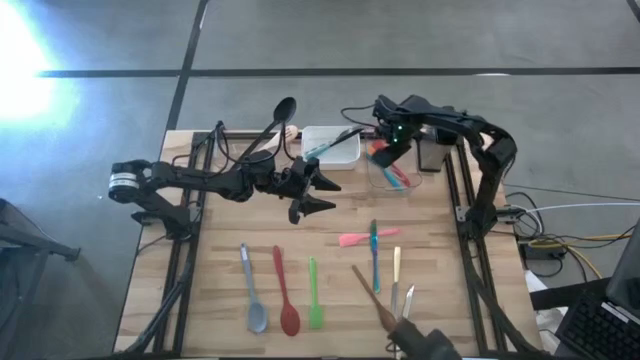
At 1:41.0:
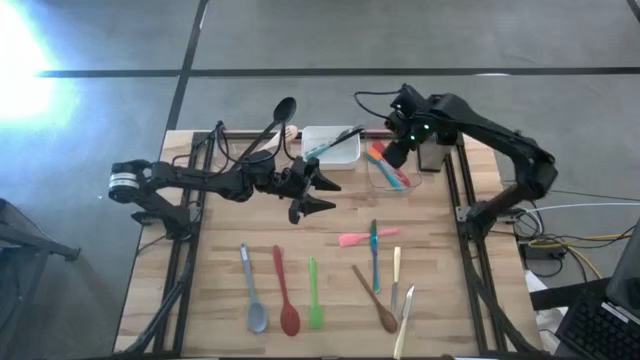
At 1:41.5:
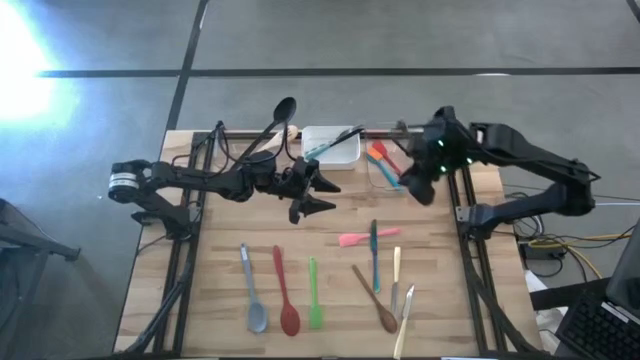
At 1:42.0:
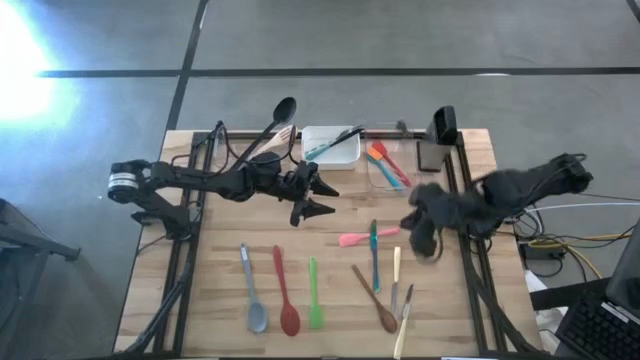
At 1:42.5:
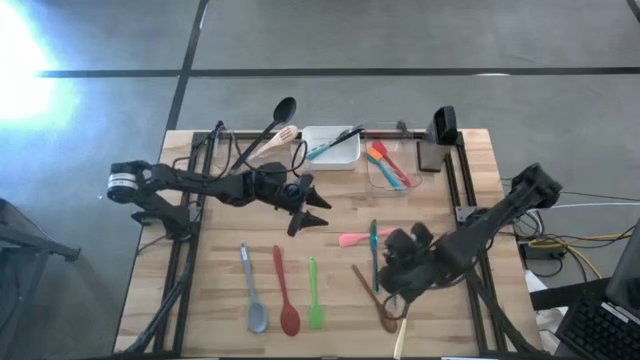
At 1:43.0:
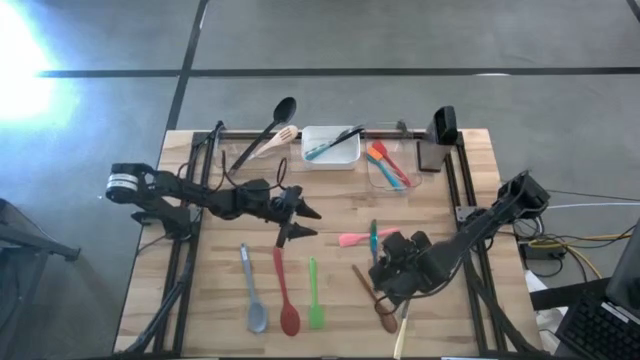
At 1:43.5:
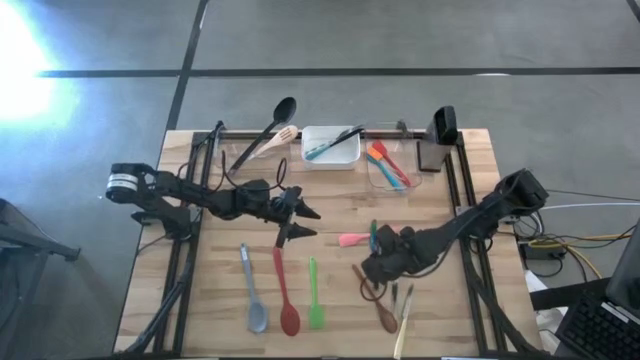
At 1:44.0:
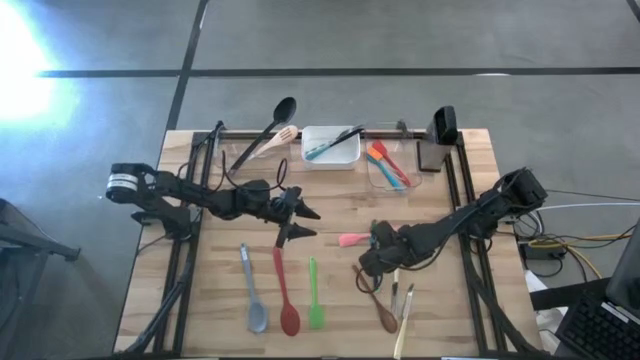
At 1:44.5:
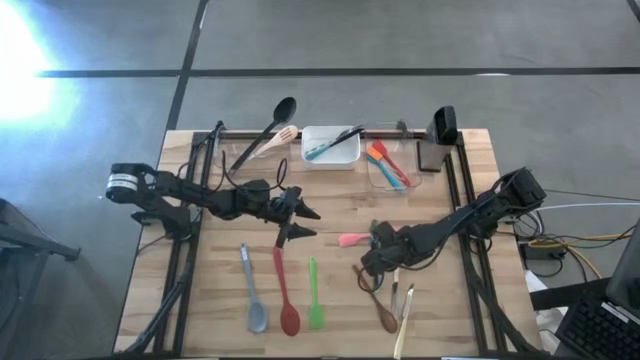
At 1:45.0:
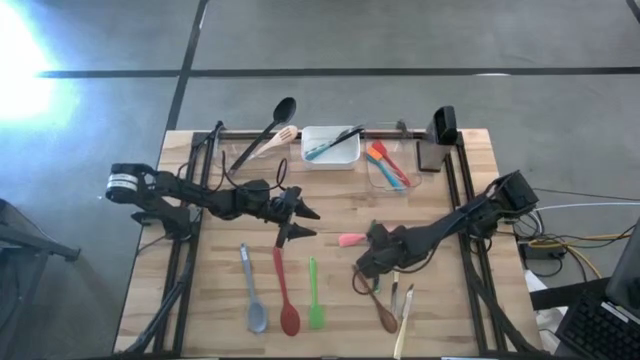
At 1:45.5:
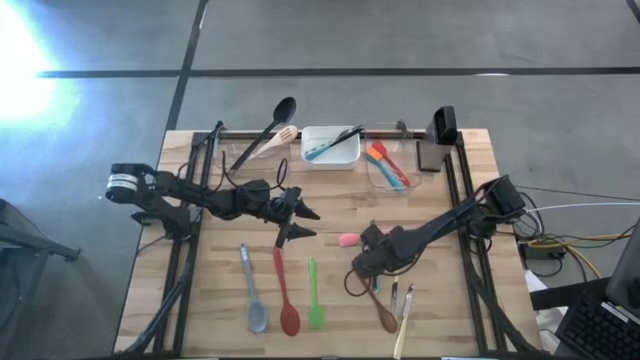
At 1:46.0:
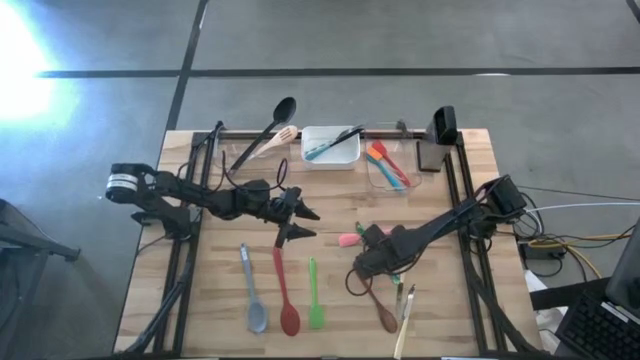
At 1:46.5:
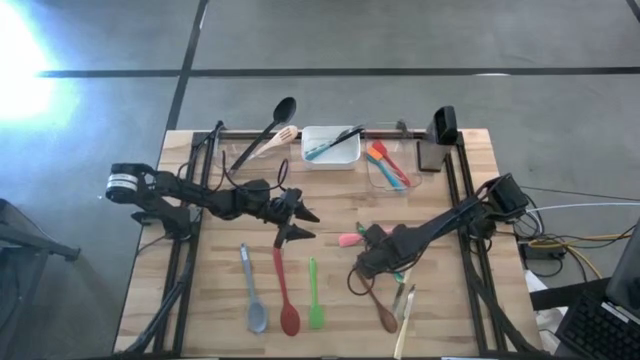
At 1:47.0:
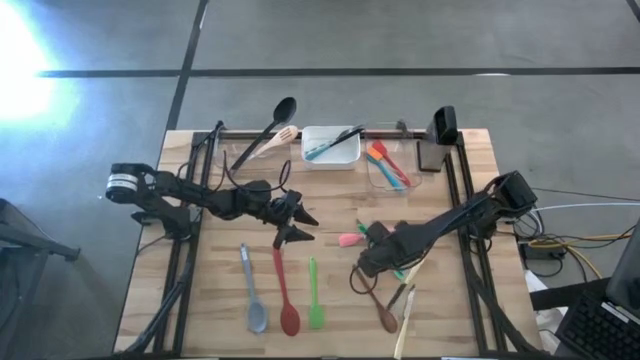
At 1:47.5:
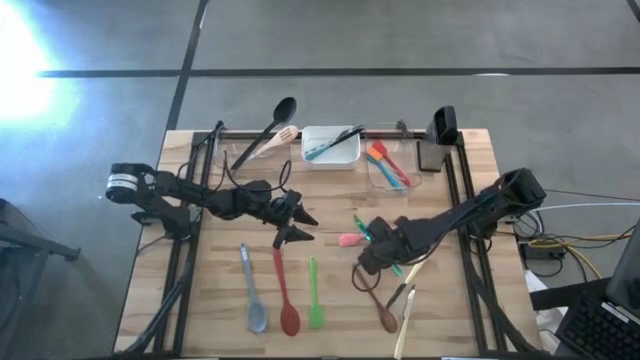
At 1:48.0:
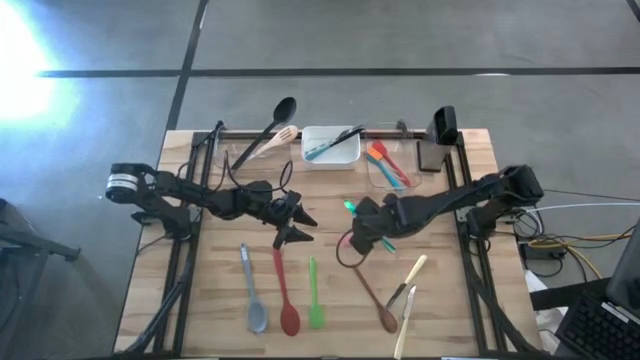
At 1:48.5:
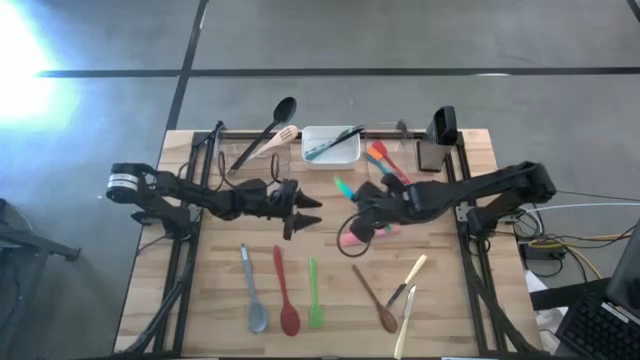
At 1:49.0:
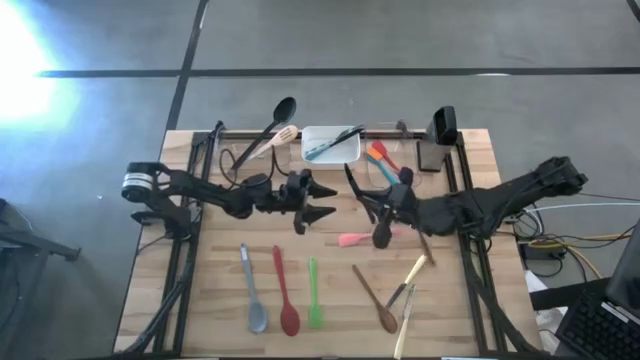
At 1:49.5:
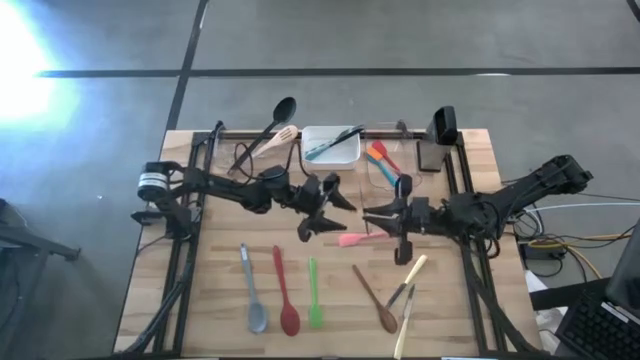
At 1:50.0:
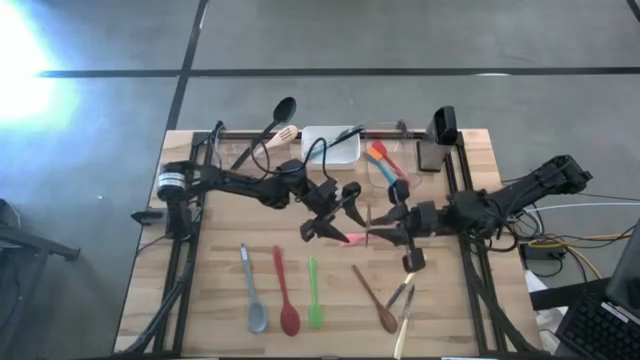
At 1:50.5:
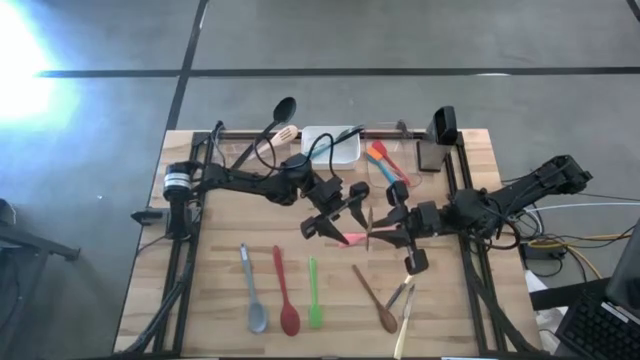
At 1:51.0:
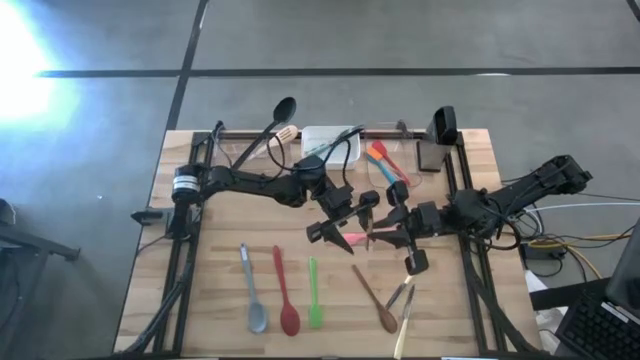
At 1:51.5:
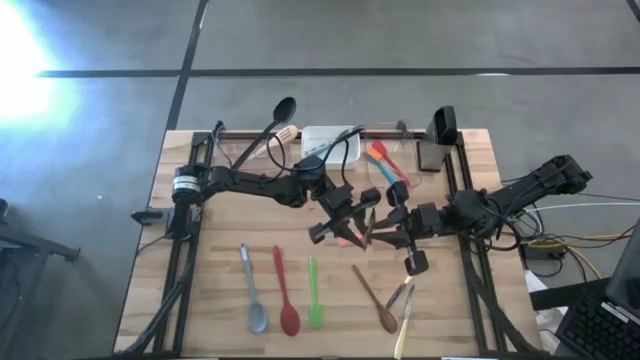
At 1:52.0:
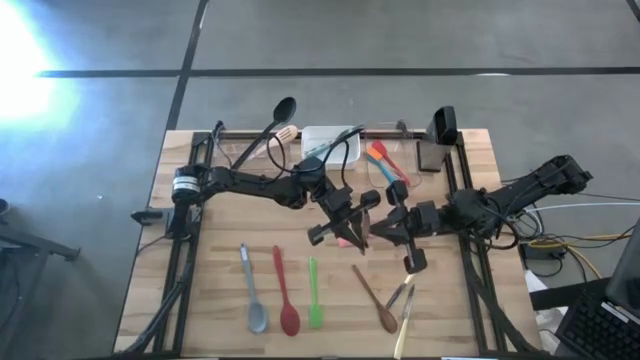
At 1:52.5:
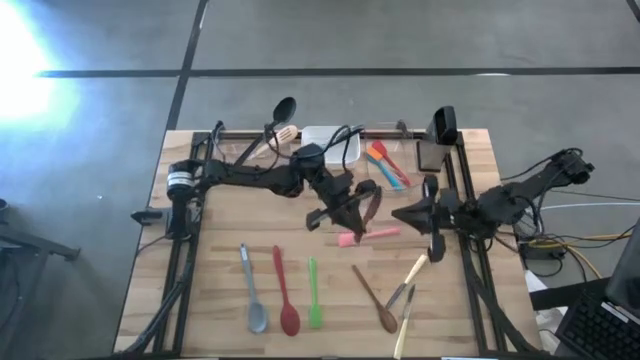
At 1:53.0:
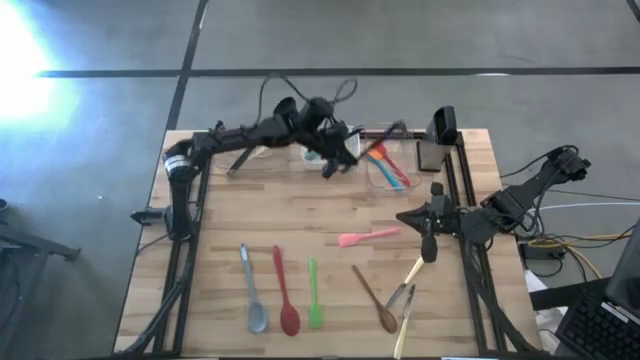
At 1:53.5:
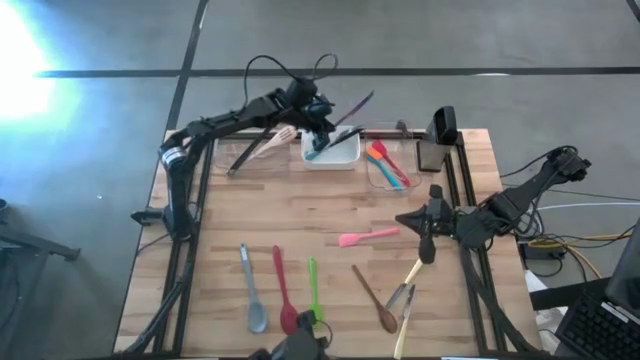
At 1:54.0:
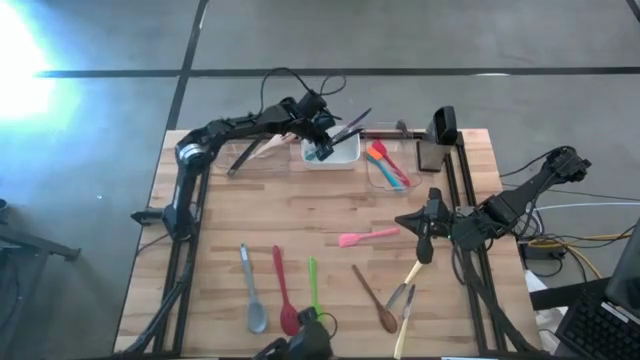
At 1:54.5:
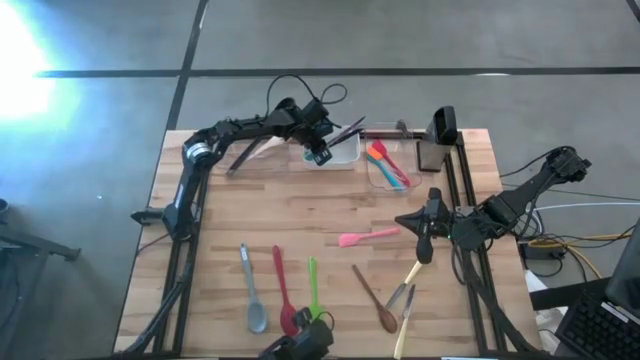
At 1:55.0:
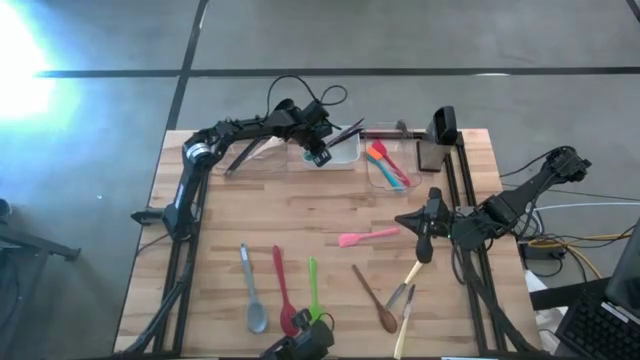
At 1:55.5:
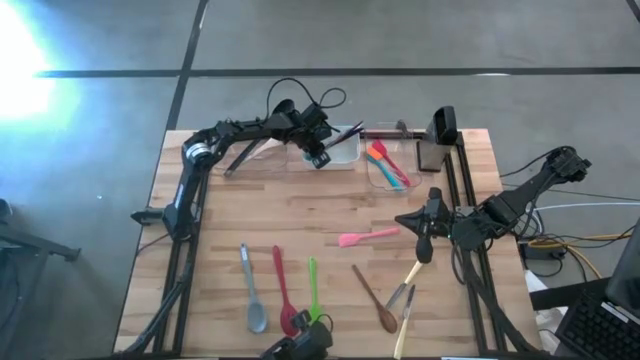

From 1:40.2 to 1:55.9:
Task: Pick & Place Kitchen Items
Put the dark blue table knife into the white bin

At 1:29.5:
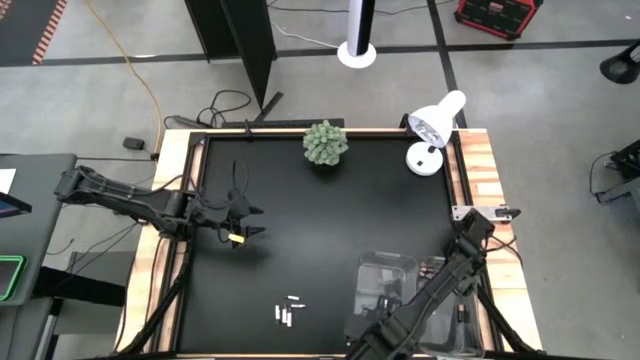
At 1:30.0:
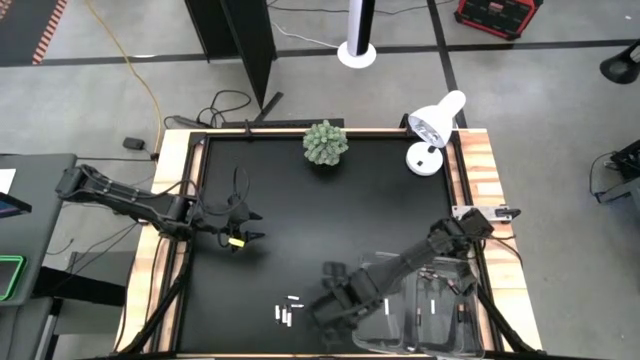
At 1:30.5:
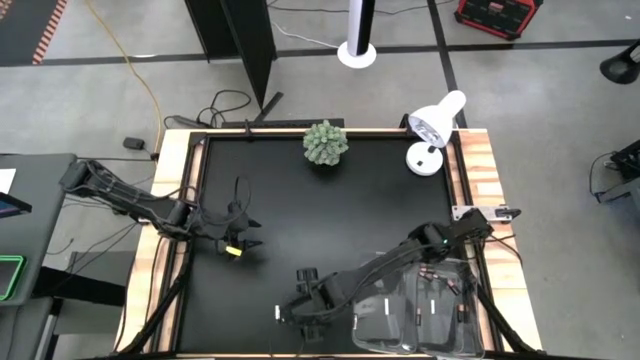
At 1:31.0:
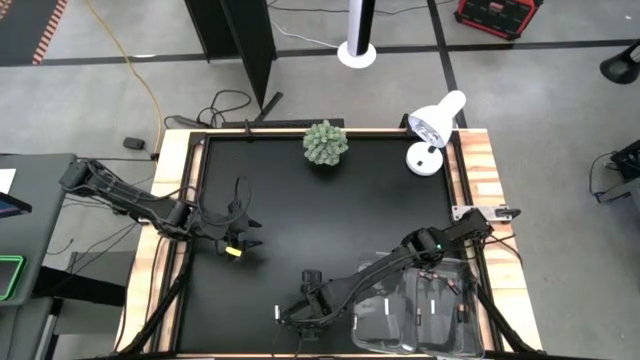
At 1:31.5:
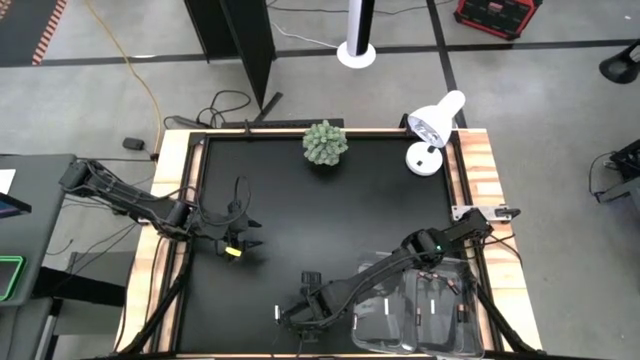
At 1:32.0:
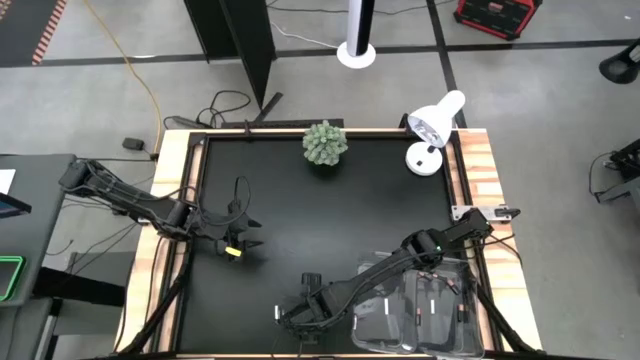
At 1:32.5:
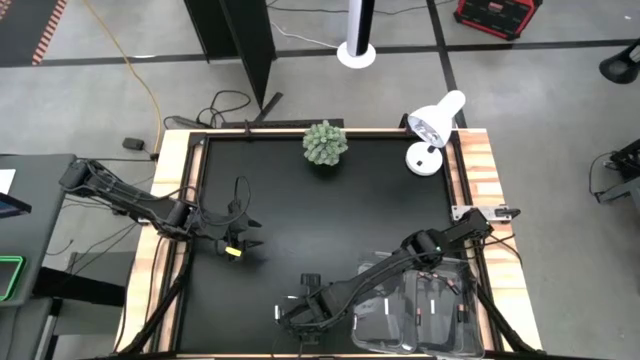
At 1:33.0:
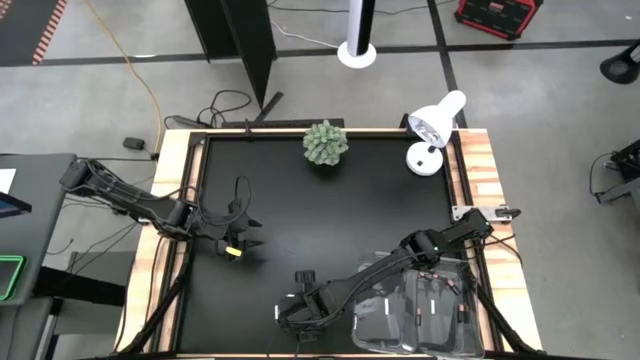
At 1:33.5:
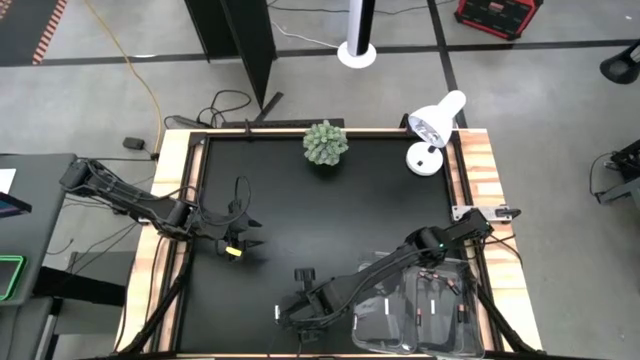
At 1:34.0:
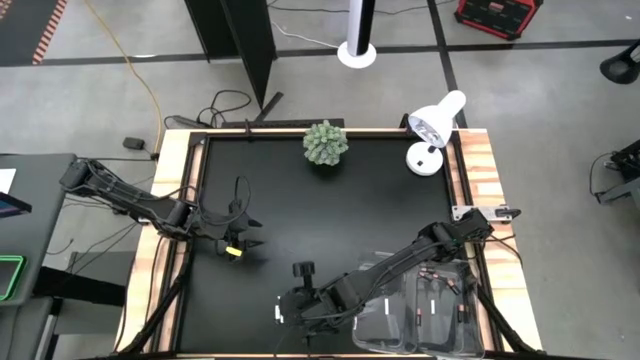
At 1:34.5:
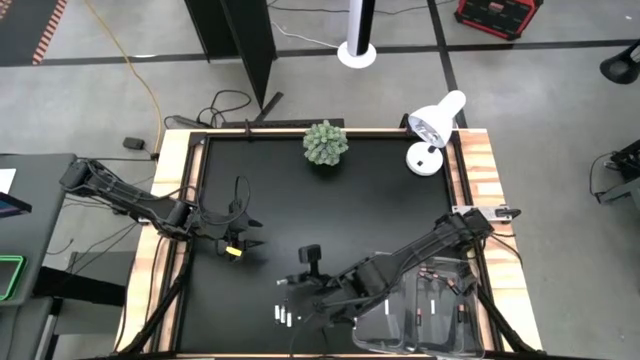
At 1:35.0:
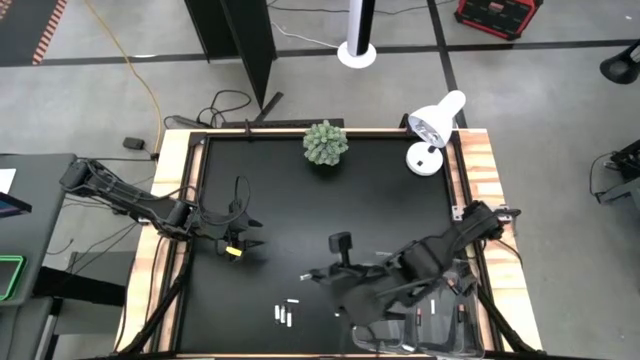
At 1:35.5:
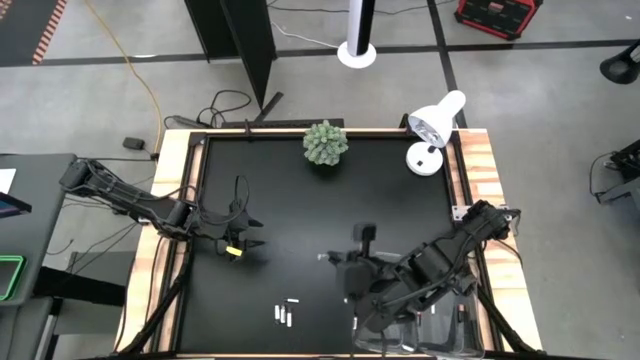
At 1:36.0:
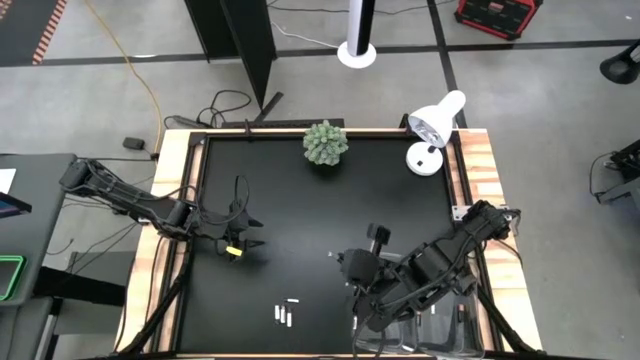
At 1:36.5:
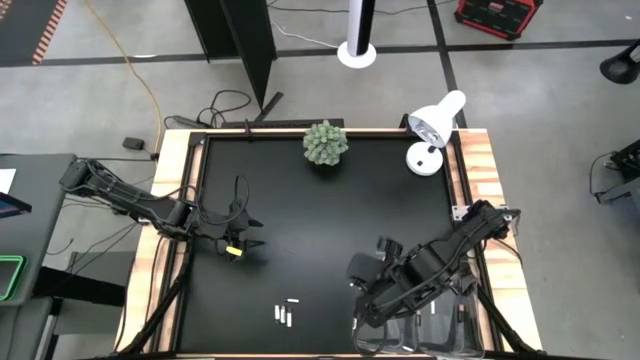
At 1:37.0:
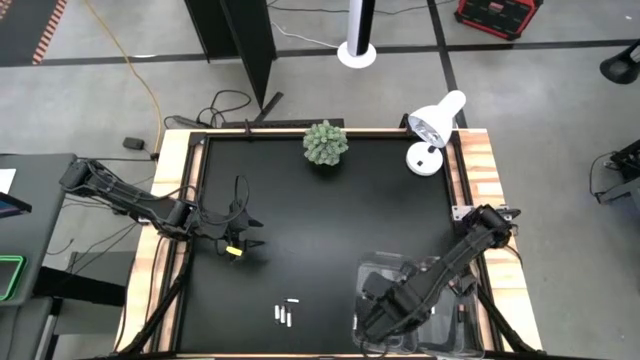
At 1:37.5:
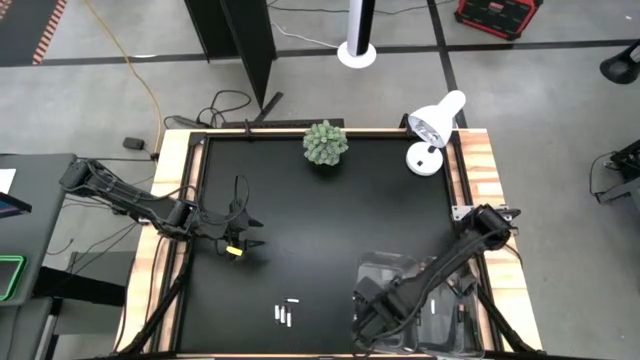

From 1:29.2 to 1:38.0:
Task: Sort batteries
Put the silver battery into the left transparent bin
